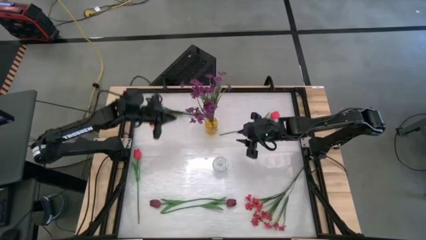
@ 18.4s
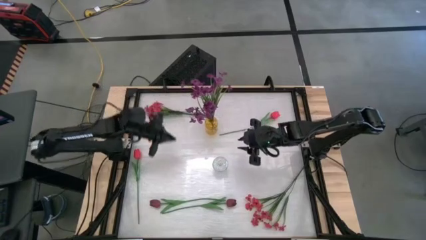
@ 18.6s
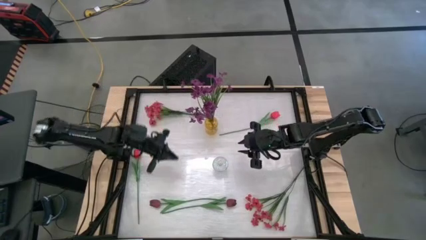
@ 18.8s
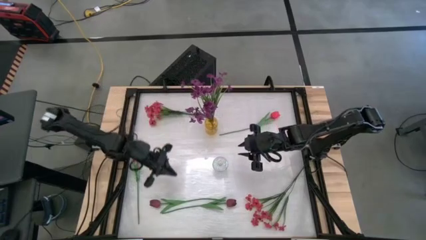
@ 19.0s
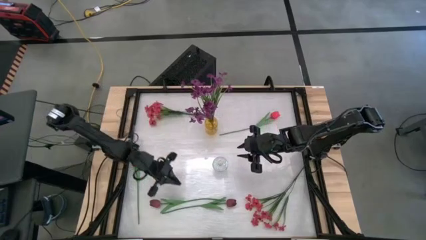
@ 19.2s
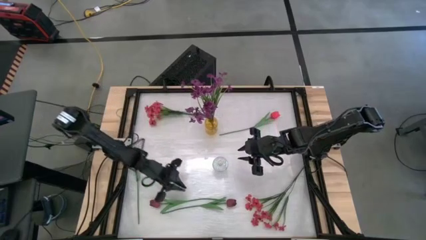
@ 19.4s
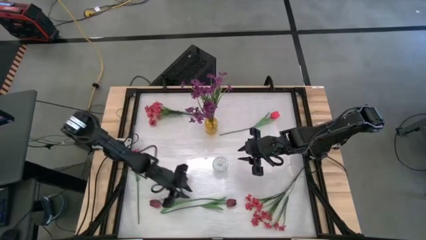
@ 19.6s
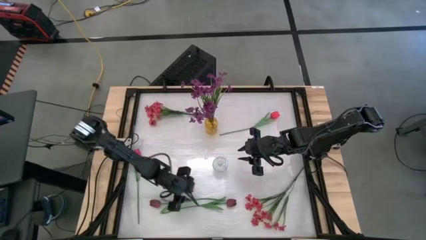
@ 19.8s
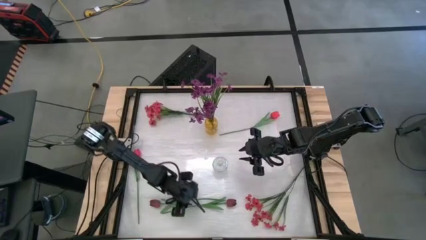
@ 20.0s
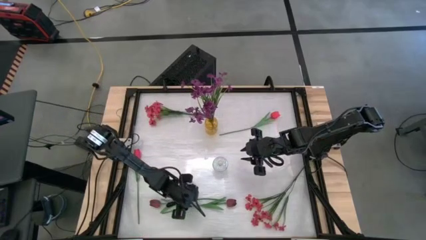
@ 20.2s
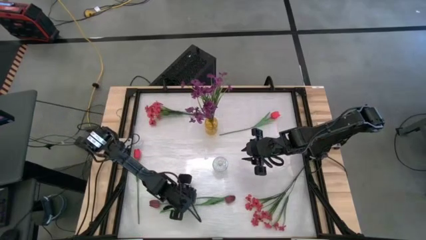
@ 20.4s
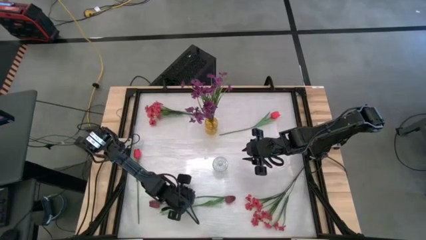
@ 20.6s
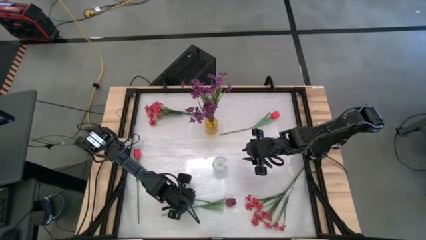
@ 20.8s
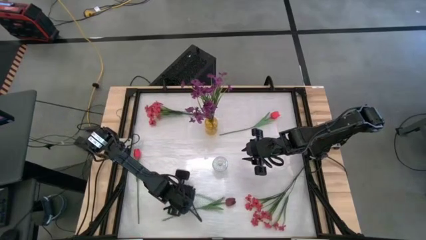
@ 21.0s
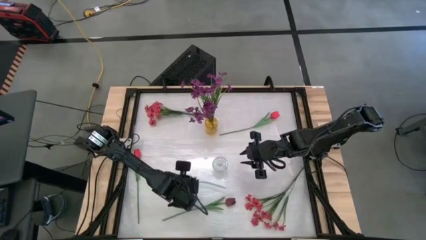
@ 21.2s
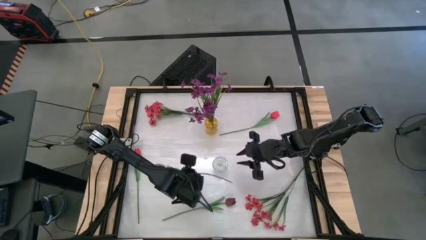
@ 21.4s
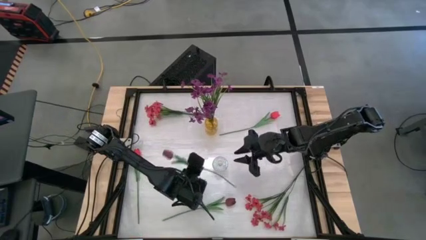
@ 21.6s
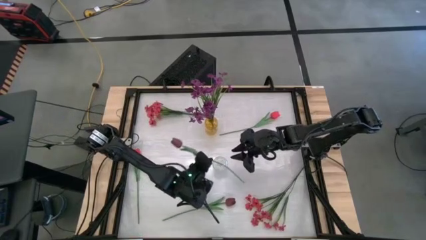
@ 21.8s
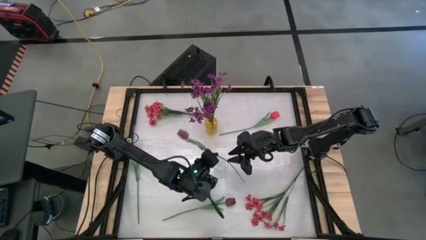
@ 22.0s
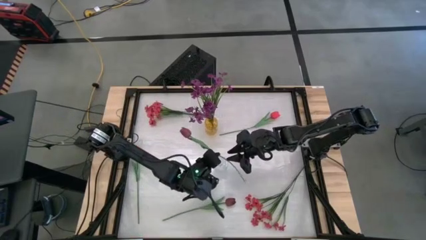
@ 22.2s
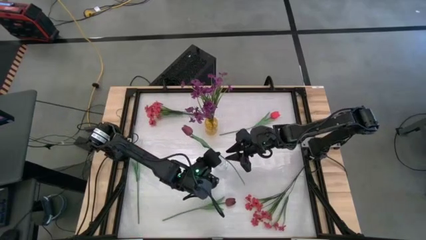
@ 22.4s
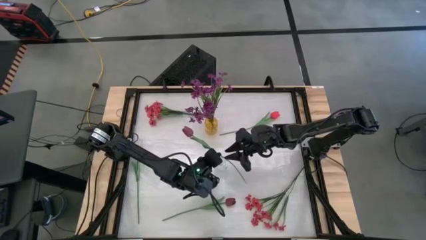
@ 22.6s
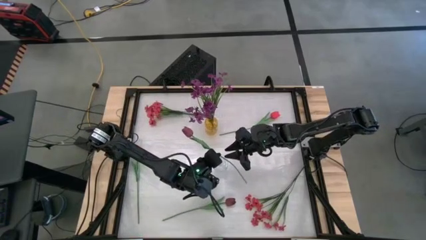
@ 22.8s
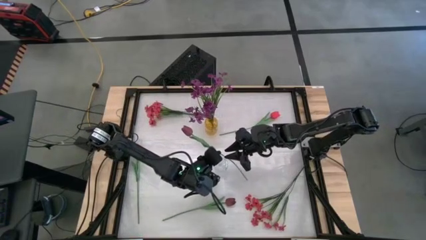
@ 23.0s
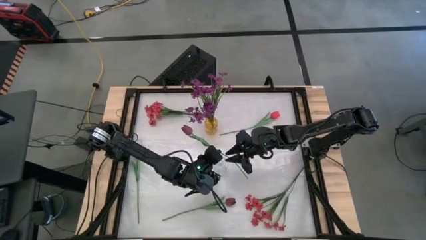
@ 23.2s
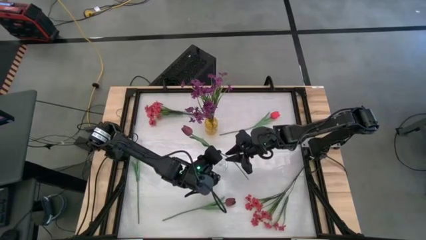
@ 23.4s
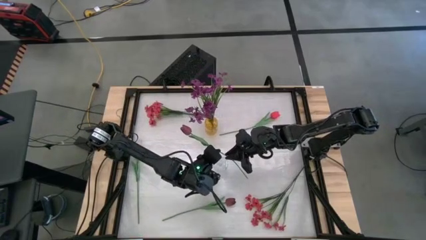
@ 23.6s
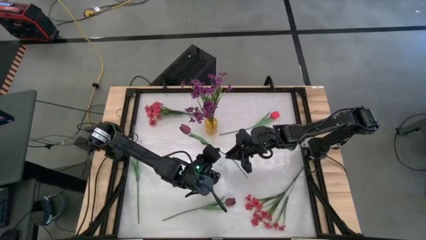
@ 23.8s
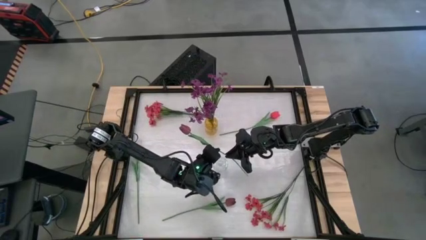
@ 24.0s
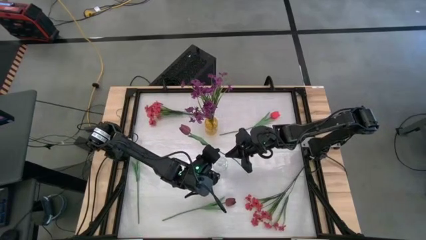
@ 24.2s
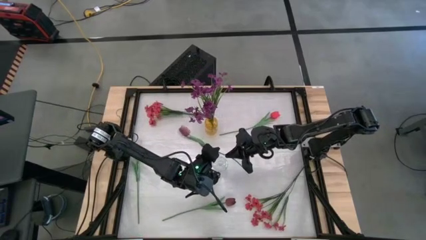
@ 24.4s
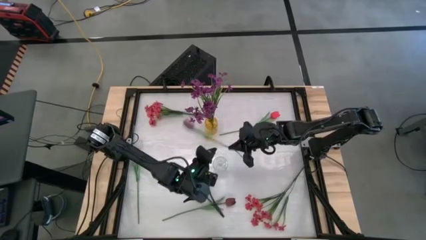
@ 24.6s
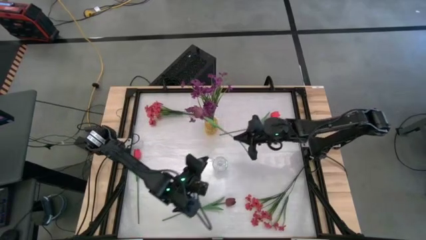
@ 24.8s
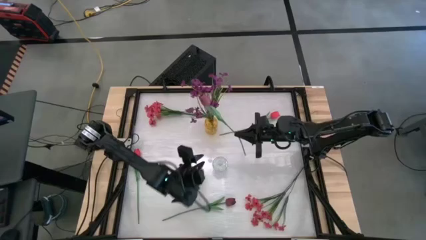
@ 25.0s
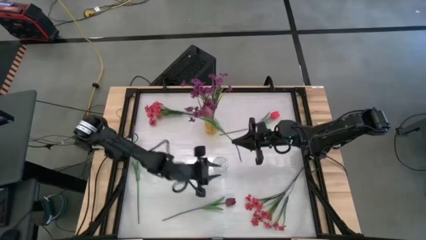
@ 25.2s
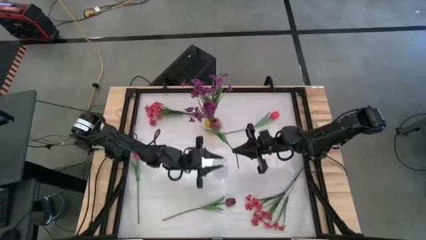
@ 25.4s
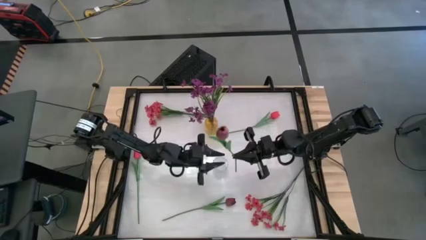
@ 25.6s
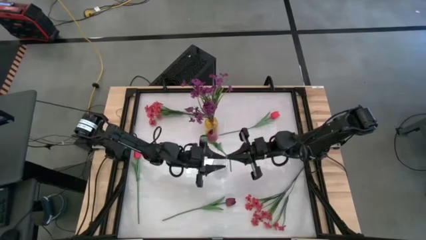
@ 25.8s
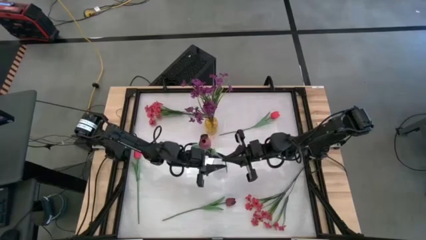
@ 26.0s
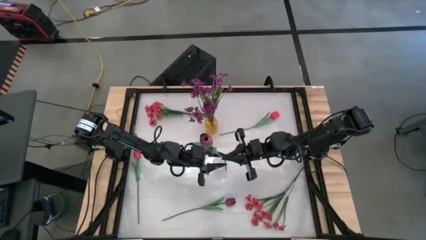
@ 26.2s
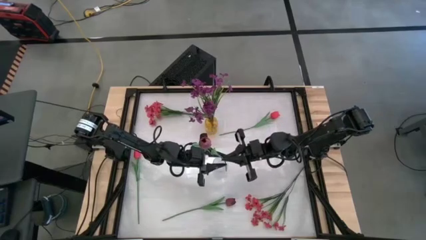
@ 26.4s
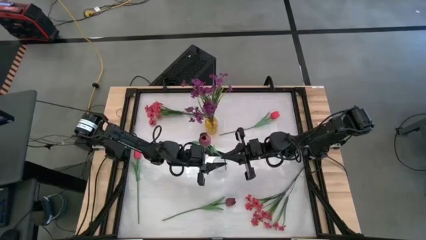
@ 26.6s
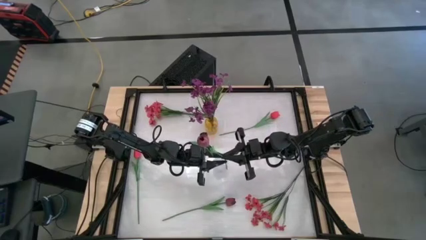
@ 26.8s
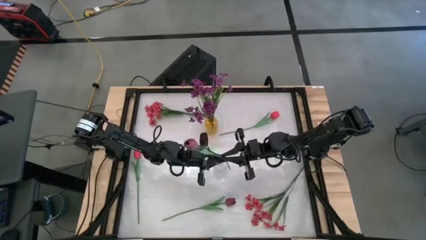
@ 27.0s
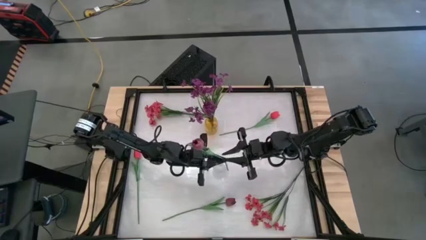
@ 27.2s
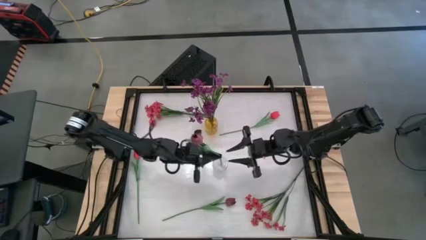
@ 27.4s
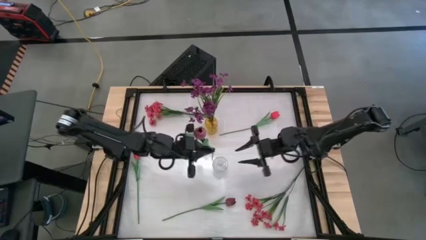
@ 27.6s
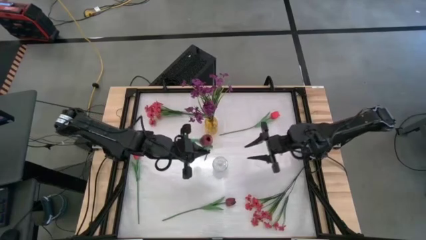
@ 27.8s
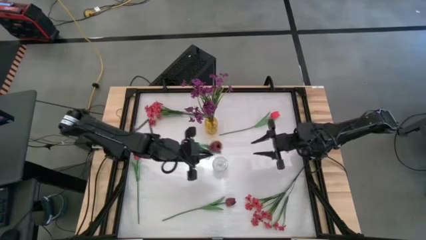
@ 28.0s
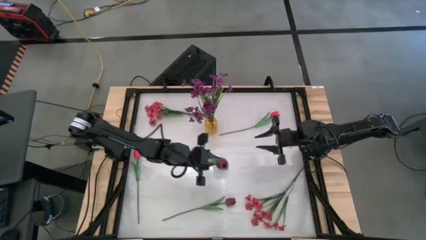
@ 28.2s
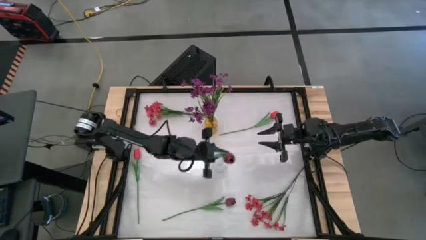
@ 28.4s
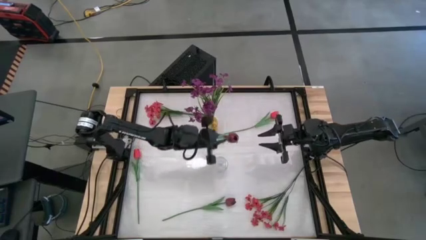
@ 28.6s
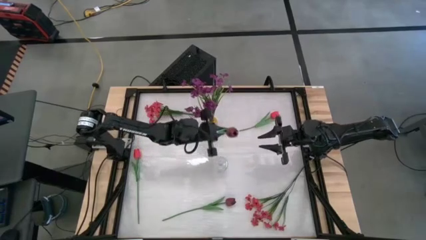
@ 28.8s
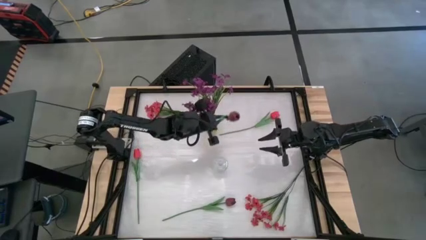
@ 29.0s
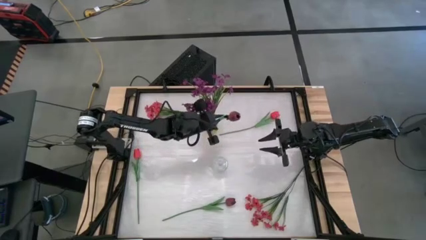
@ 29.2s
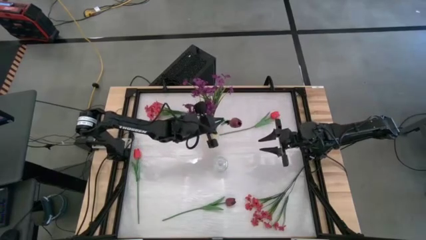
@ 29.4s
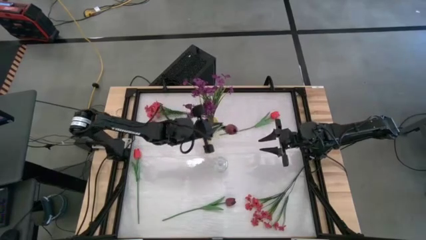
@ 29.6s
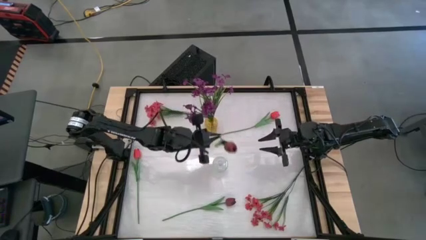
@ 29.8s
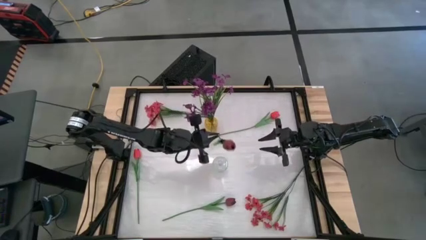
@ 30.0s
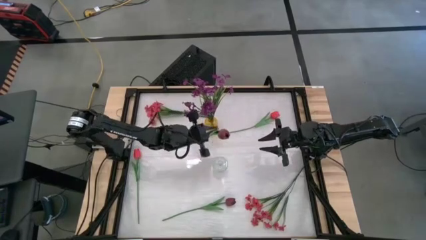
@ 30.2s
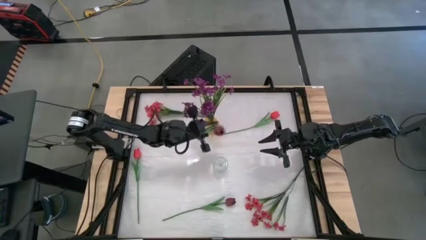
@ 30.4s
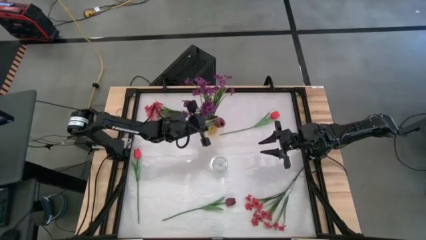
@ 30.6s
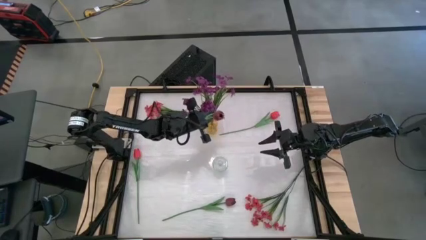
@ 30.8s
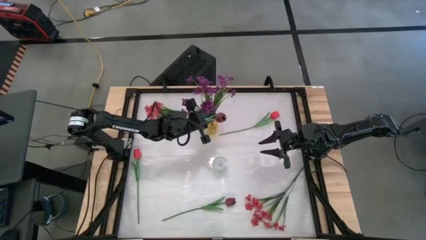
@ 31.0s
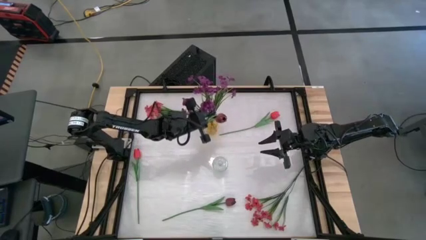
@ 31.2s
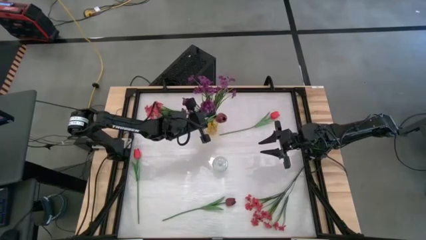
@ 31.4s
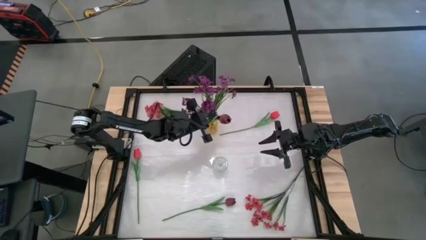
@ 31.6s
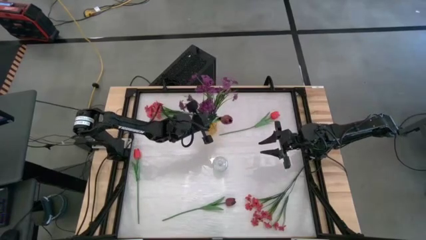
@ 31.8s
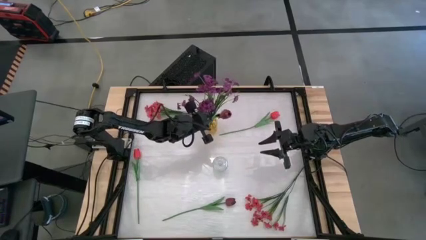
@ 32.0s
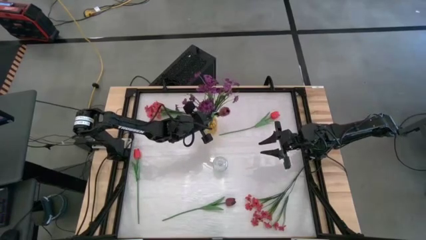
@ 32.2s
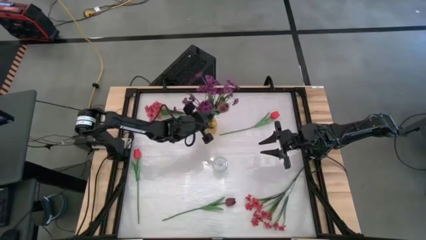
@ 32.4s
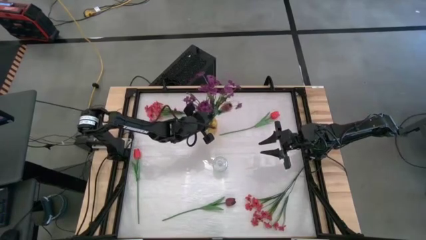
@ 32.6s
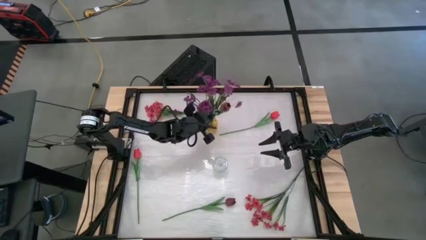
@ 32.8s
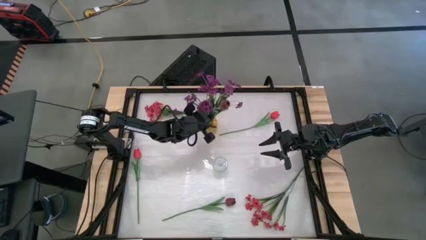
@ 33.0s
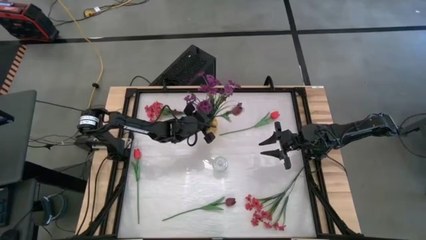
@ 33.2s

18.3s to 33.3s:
Task: Sort flowers into vase by color
Put the top purple flower into the yellow vase

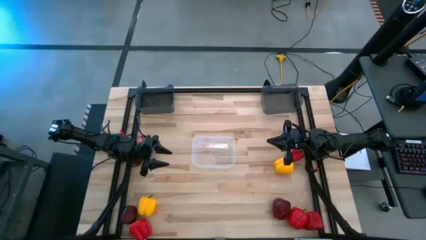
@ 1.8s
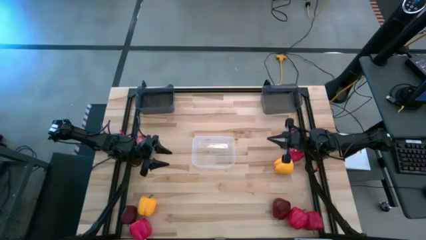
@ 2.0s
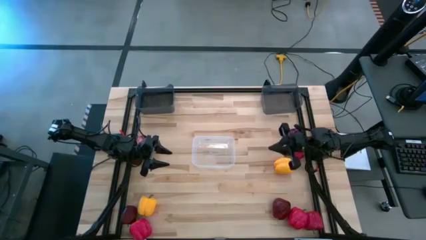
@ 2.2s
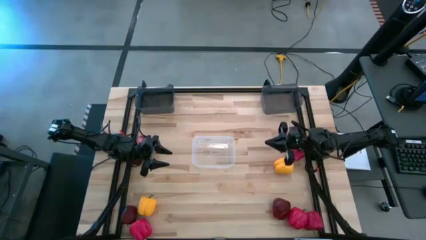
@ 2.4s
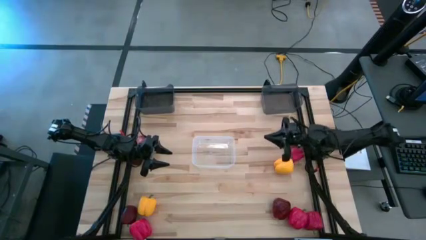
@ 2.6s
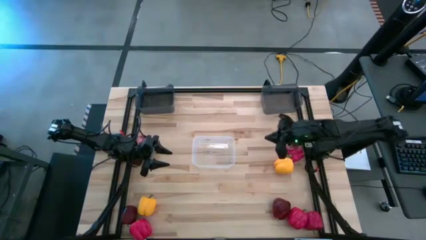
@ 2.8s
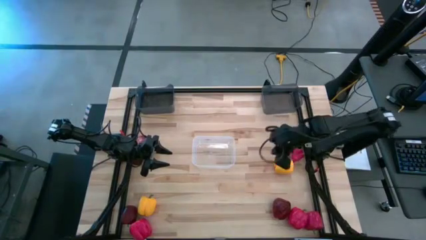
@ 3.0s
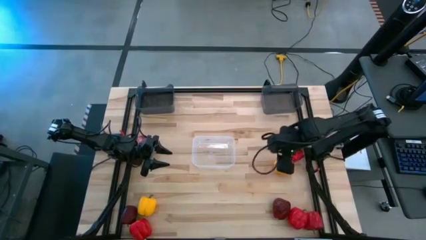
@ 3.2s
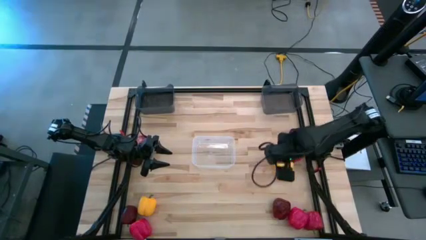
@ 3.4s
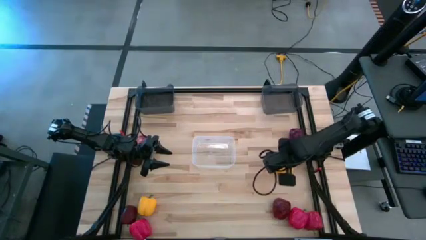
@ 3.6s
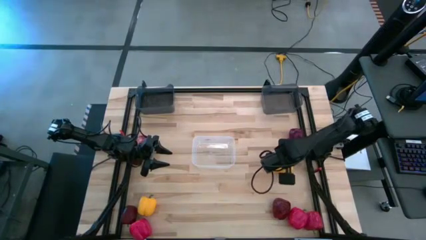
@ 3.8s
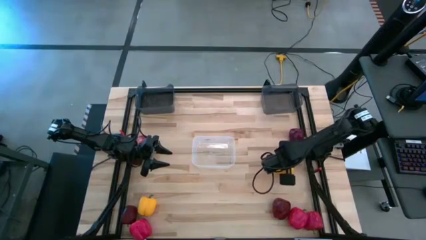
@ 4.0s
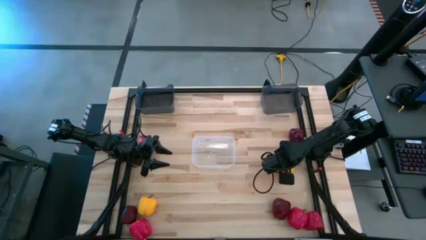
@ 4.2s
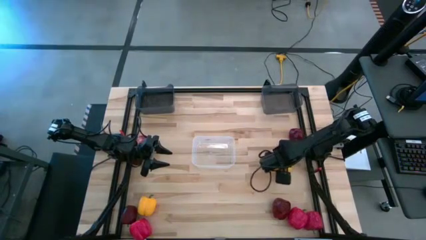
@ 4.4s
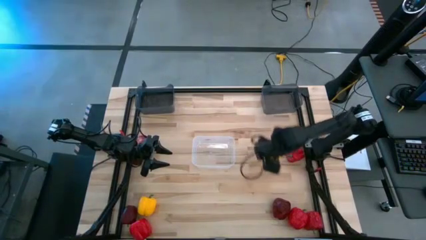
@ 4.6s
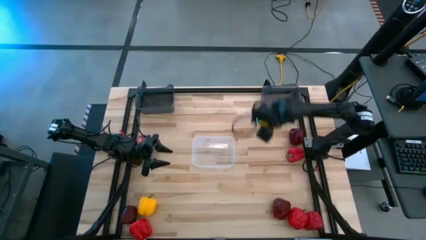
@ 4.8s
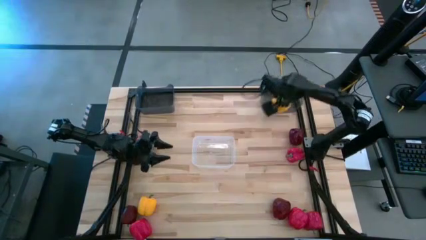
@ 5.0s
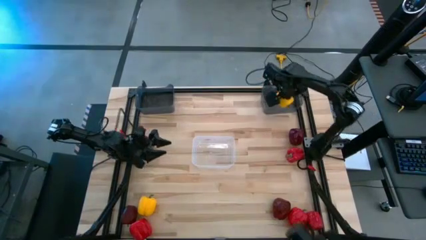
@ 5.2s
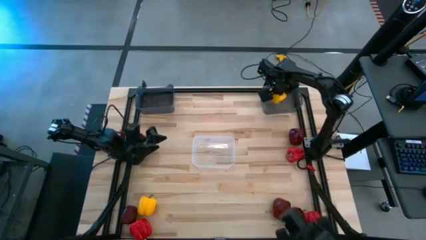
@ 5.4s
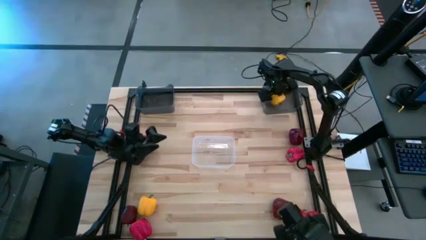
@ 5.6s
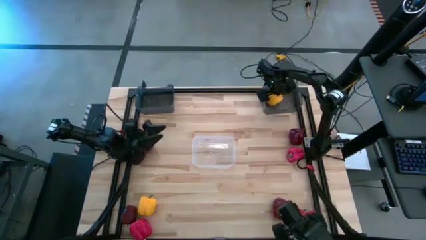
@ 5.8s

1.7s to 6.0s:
Task: Sort produce into baskets
Put the yellow bell pepper into the right black bin
